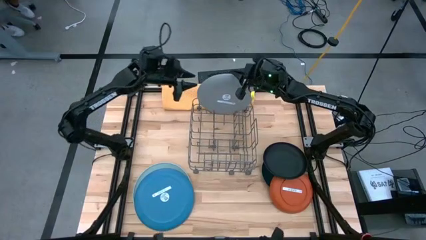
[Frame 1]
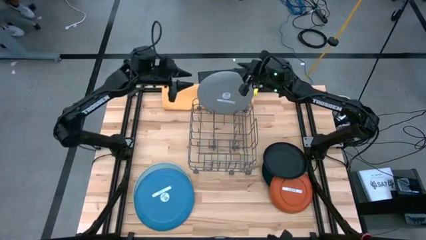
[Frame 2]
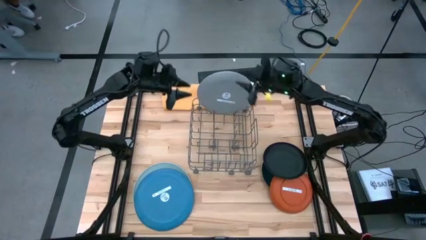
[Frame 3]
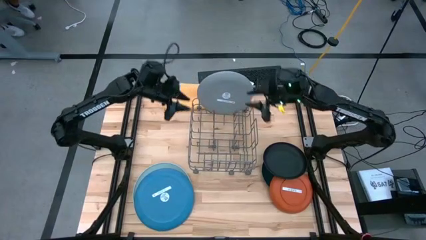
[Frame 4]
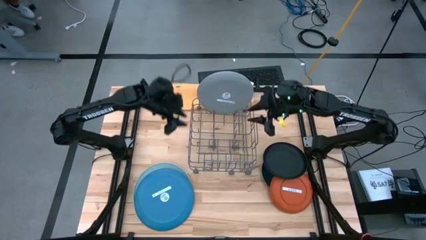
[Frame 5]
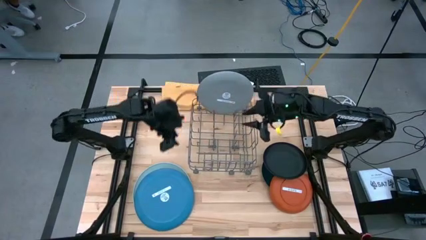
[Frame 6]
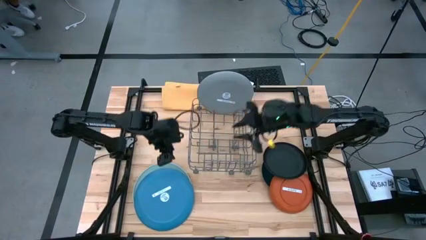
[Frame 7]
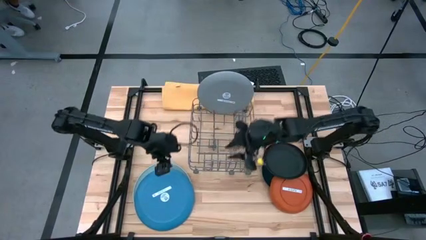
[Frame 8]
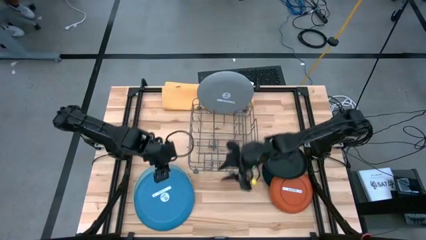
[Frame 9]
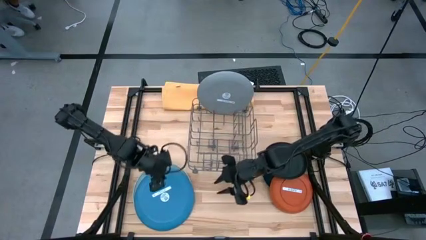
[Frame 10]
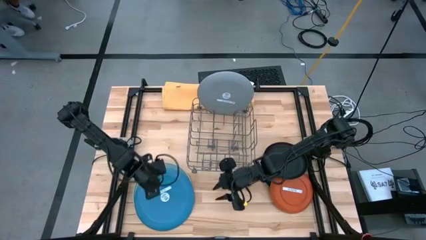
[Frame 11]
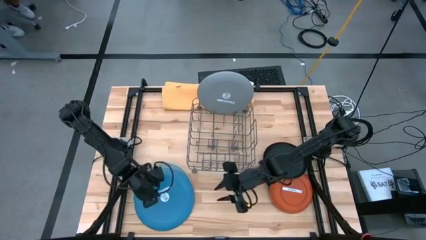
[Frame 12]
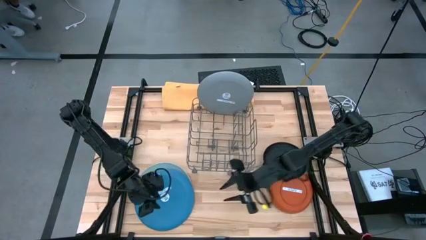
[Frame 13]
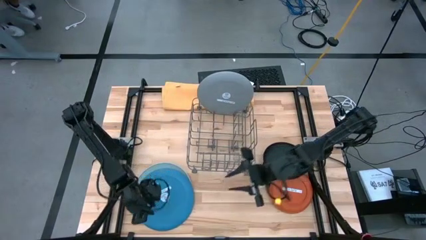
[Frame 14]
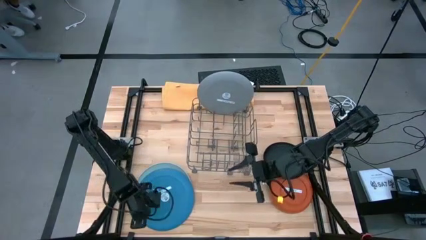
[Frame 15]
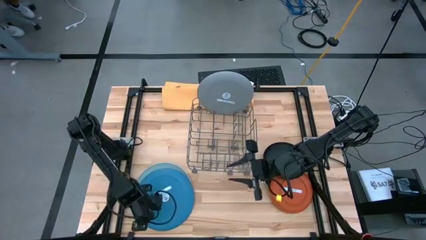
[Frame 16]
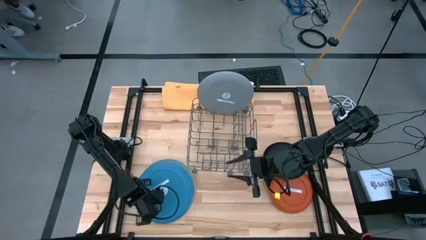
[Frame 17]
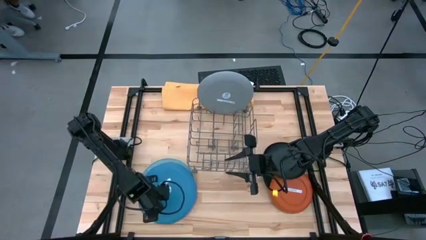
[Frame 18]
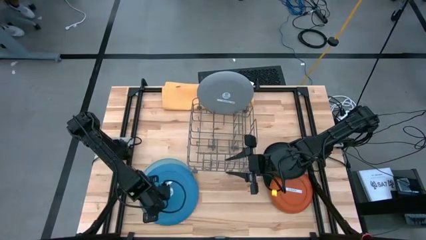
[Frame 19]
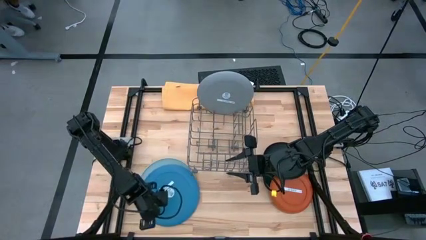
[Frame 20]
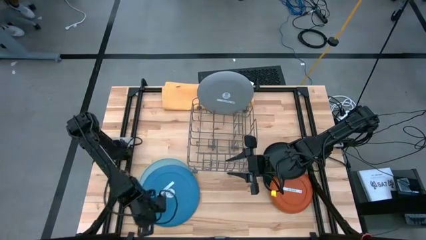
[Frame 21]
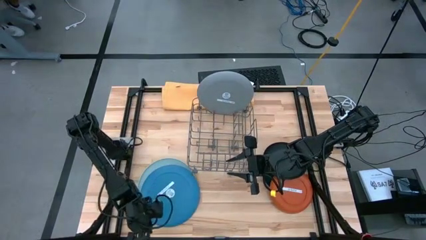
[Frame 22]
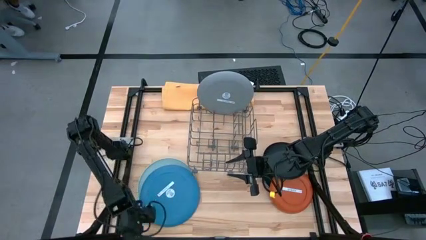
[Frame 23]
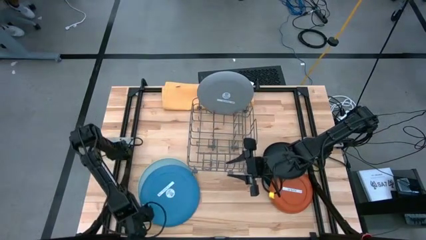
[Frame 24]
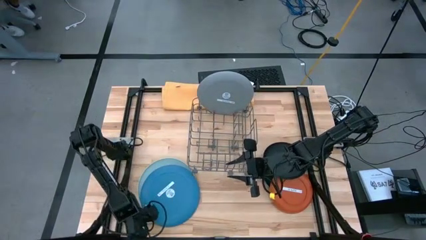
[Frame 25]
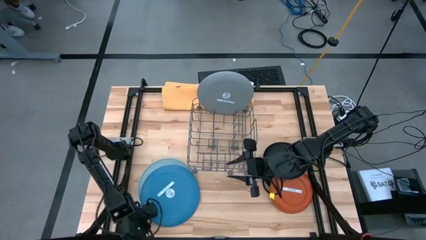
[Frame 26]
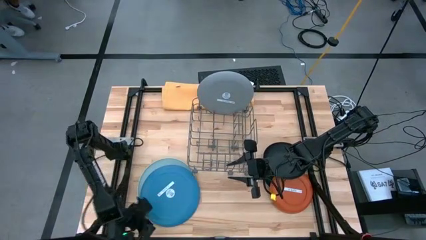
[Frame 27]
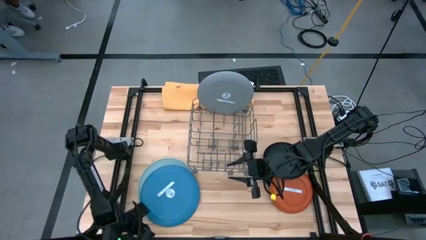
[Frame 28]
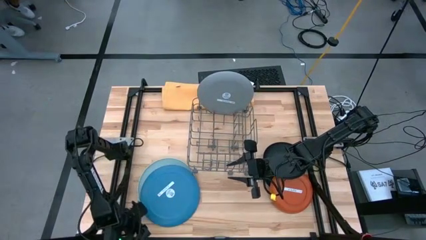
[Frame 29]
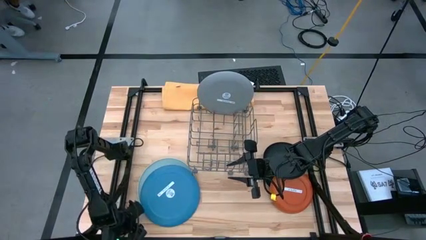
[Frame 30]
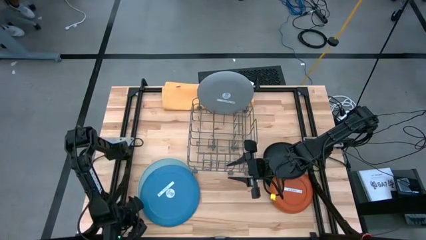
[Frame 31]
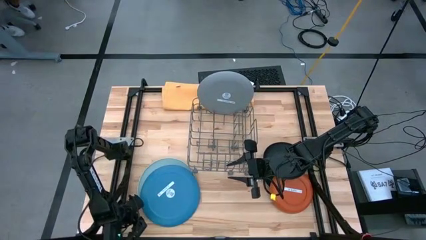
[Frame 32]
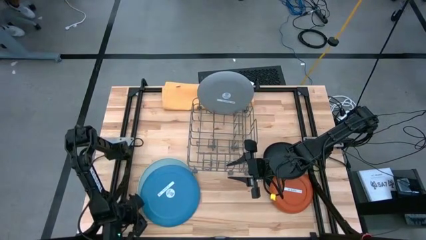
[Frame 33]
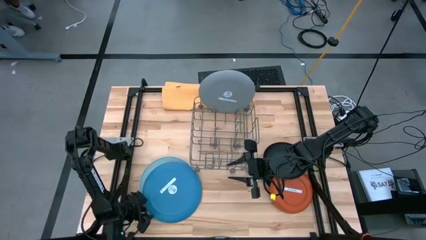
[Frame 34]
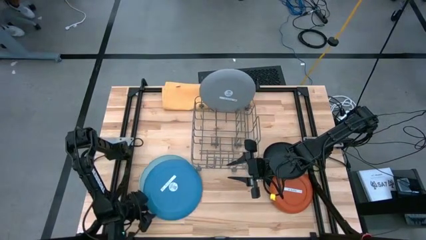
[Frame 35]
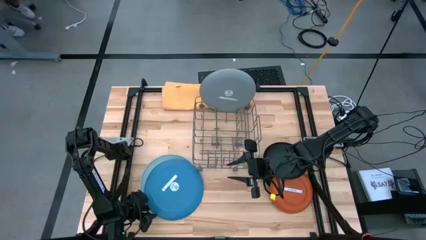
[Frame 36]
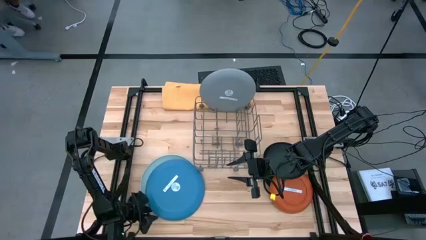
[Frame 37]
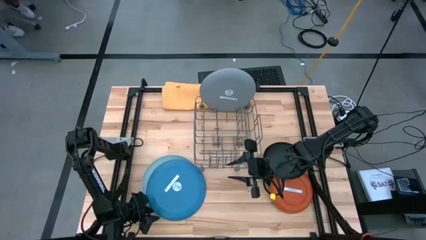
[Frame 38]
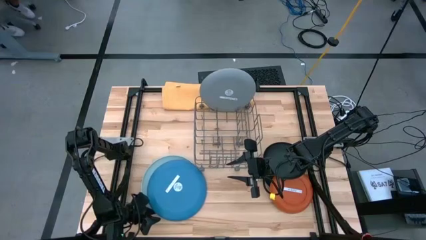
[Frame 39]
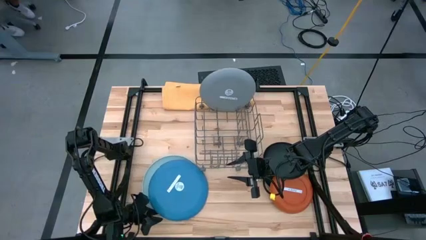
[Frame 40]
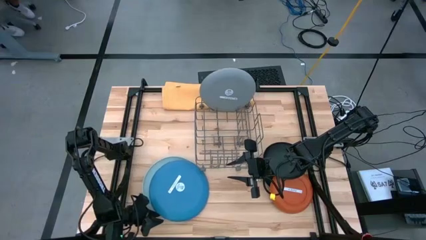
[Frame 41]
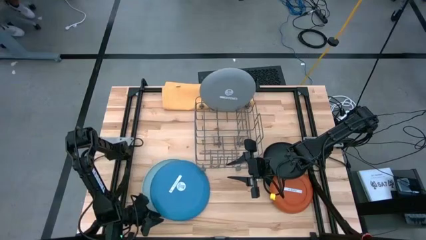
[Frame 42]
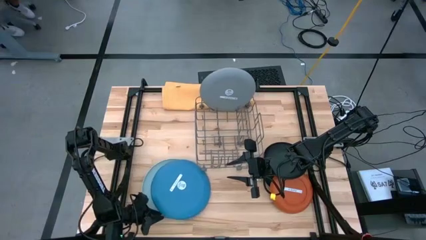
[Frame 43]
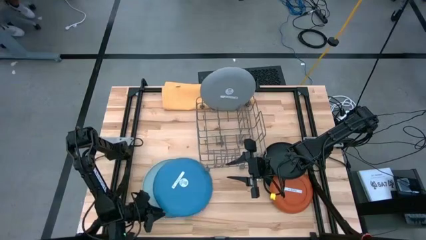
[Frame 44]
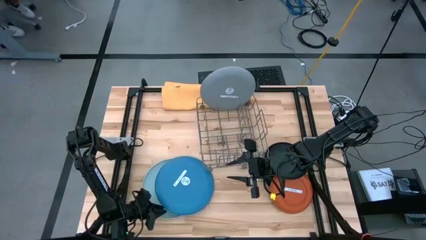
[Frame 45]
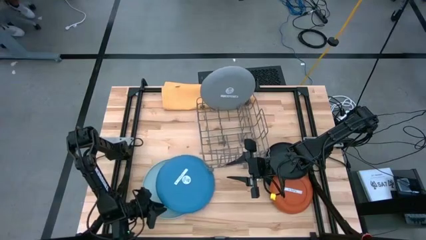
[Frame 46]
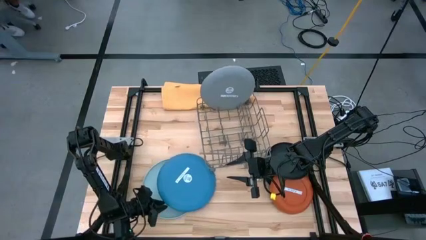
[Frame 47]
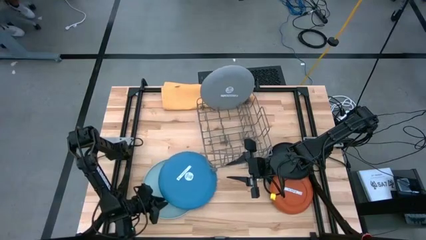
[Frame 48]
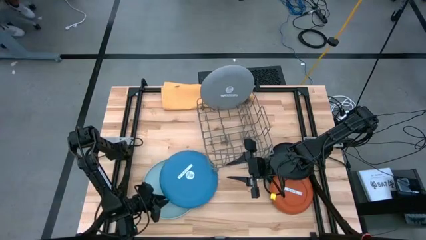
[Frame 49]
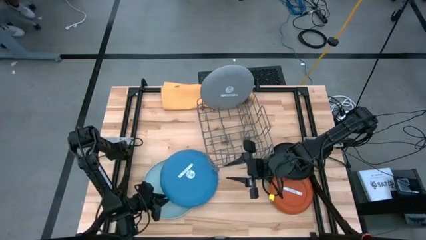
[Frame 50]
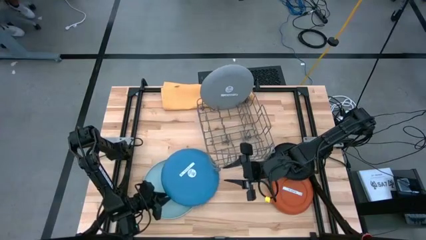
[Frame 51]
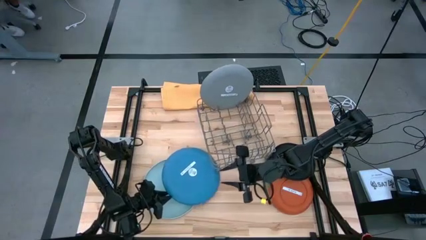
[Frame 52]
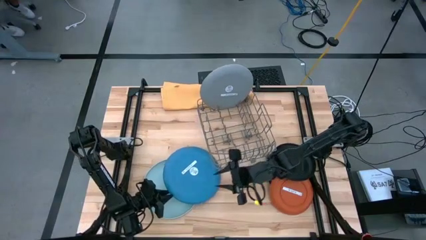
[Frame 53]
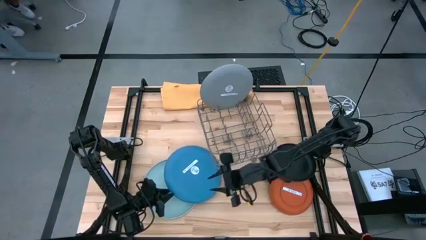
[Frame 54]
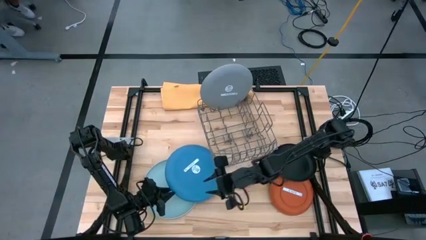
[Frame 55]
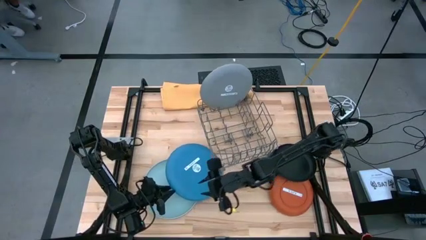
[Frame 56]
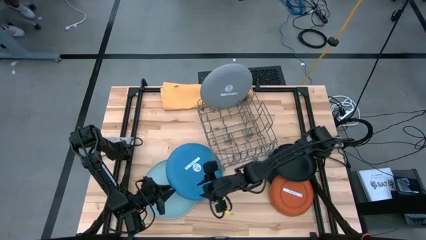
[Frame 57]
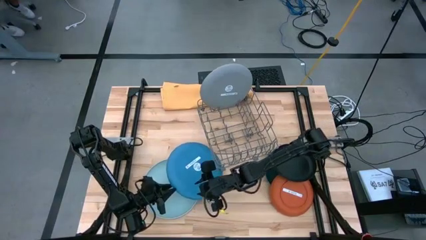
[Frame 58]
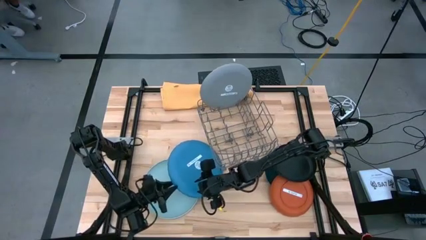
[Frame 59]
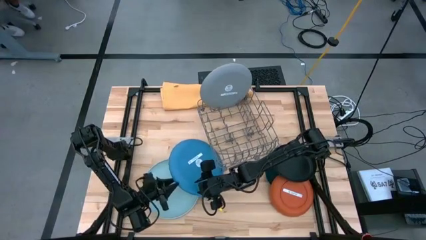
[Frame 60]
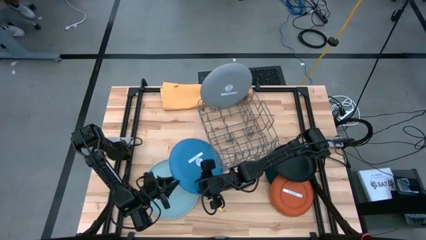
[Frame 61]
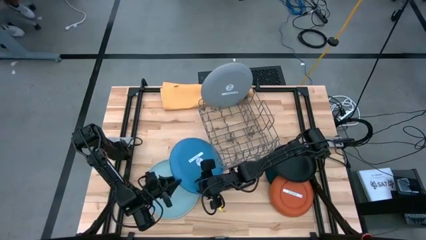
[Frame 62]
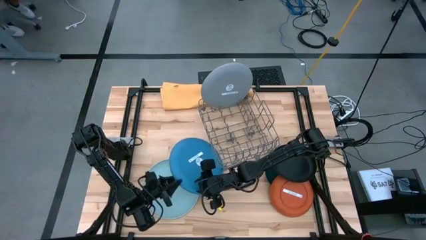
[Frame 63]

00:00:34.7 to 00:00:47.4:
Task: Sort dishes
Put the blue plate into the dish rack

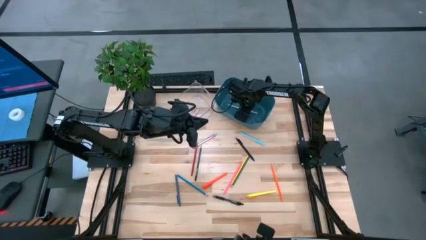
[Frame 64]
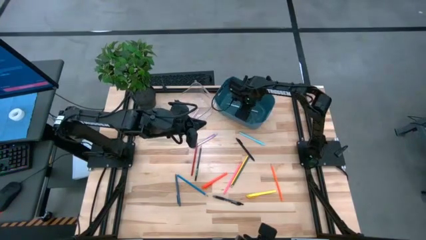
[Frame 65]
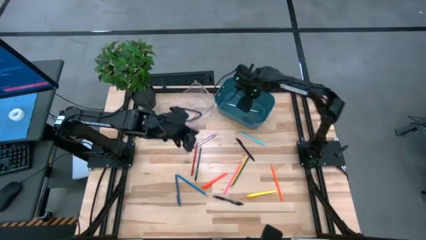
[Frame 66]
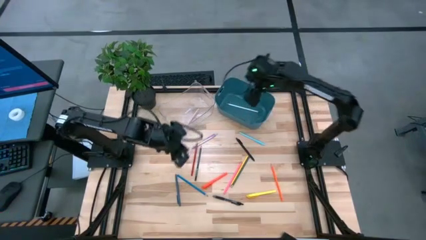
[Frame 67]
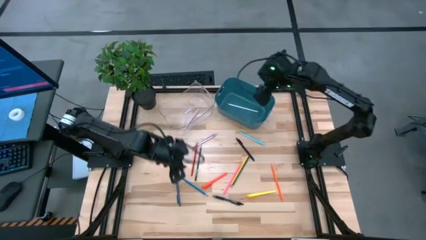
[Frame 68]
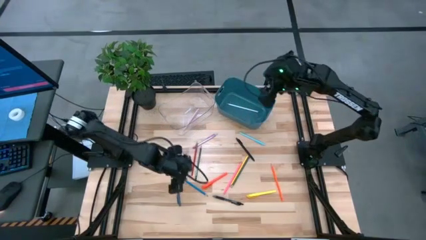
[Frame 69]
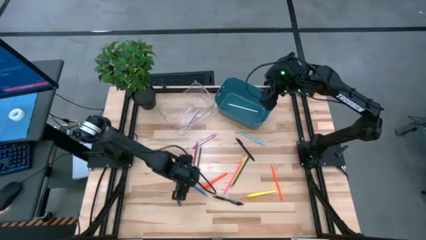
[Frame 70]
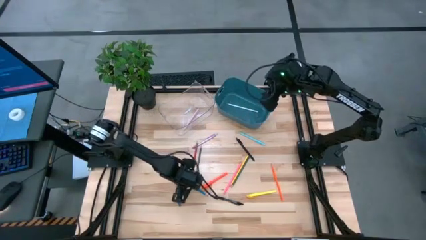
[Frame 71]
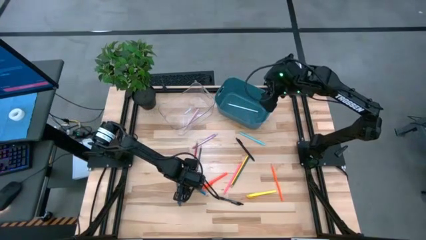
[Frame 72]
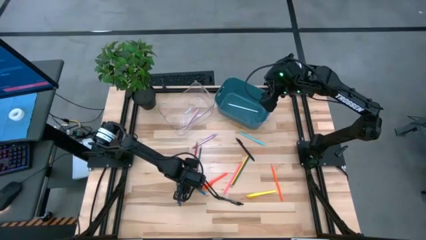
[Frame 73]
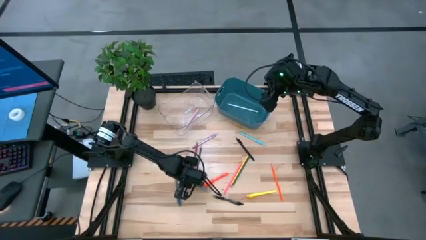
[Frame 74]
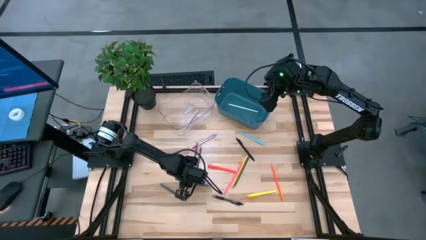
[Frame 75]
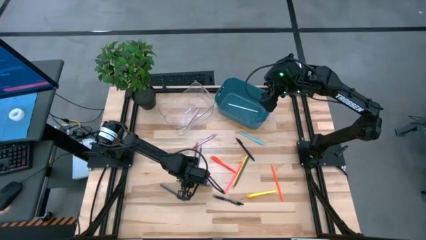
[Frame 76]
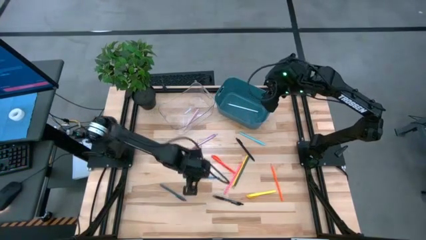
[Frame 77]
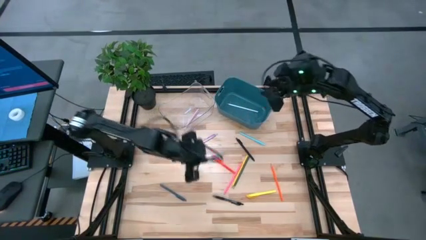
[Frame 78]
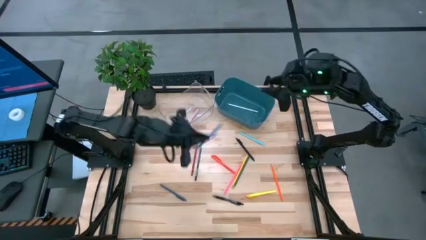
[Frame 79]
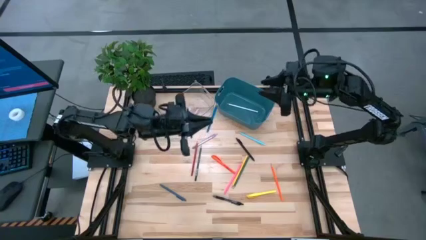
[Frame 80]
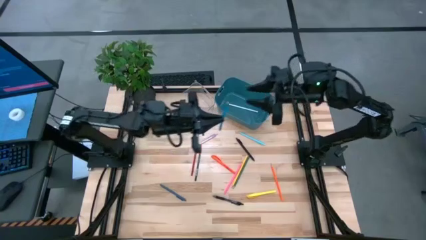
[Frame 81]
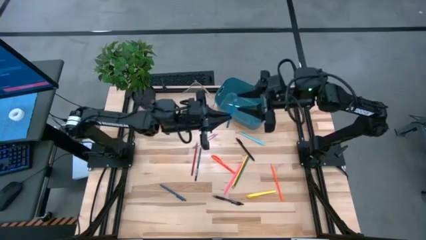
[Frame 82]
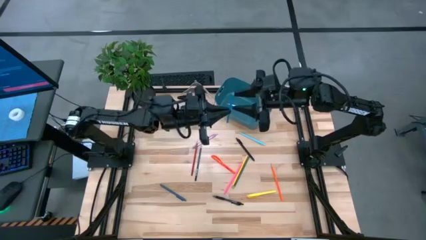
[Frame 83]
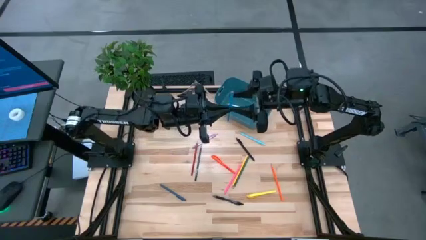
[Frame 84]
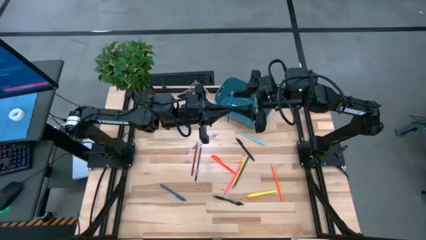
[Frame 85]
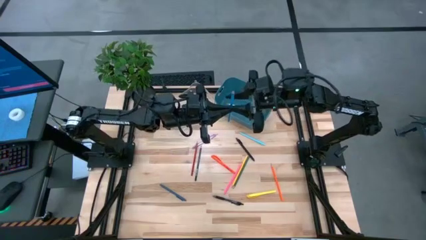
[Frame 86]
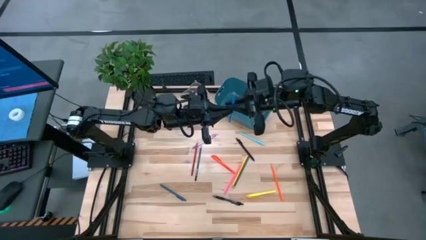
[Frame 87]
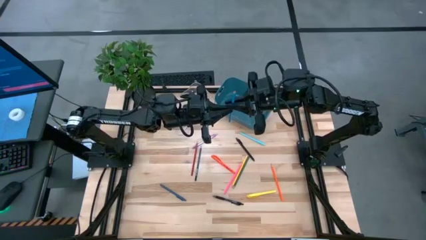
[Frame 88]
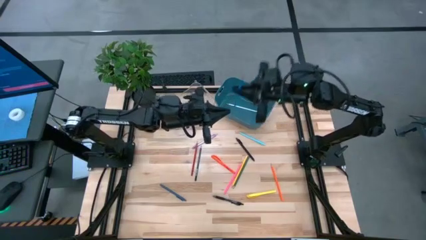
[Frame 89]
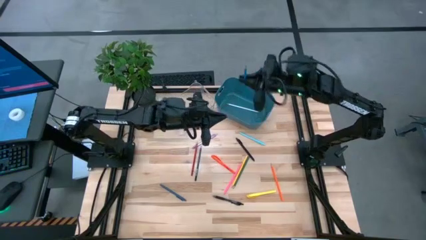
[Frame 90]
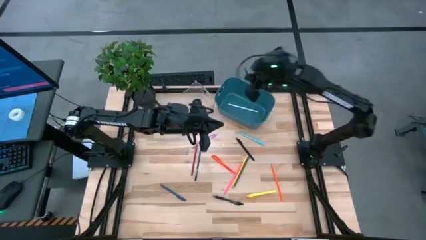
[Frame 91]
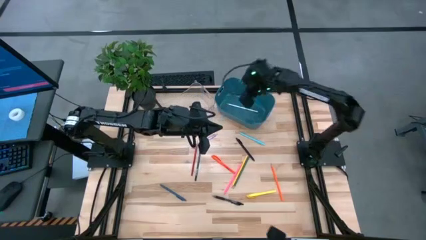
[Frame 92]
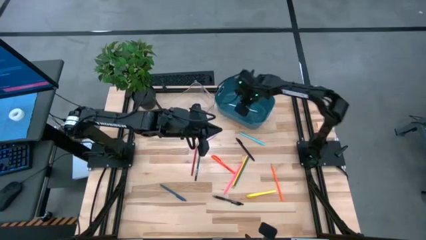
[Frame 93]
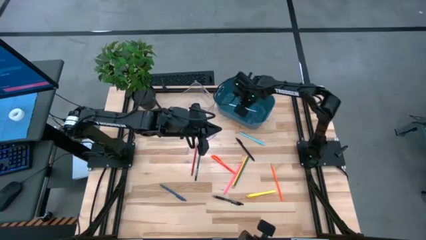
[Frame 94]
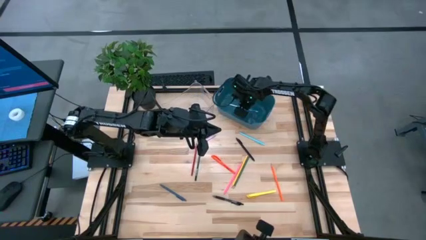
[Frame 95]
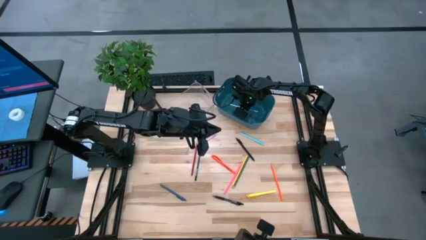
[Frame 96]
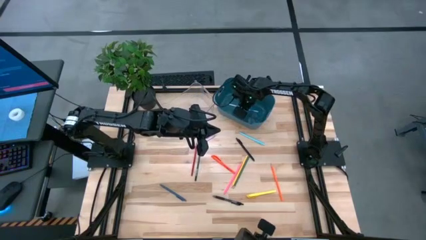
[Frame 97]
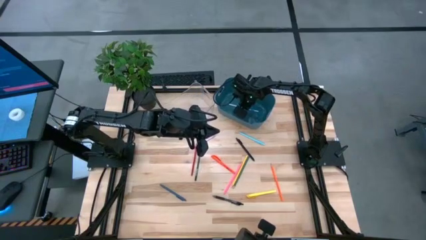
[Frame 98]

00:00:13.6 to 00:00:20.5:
Task: Sort pens & pencils
Put the blue colored pencil into the blue bin
